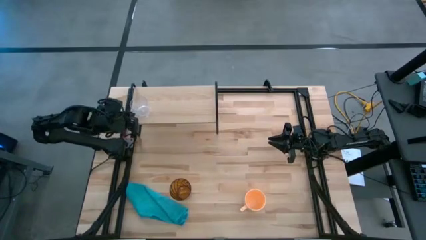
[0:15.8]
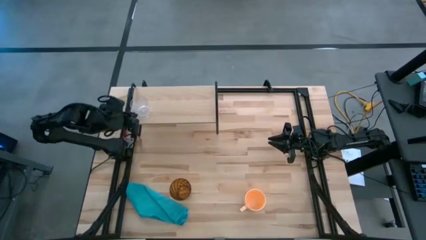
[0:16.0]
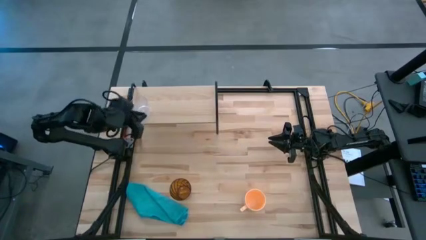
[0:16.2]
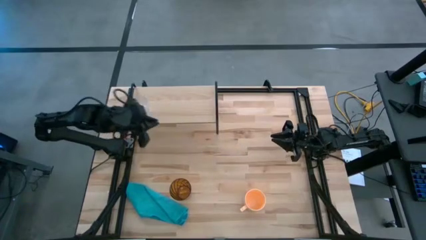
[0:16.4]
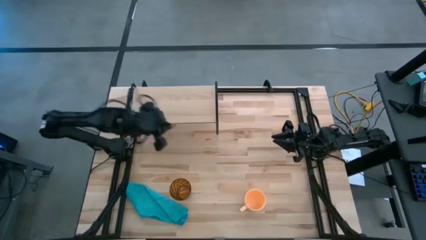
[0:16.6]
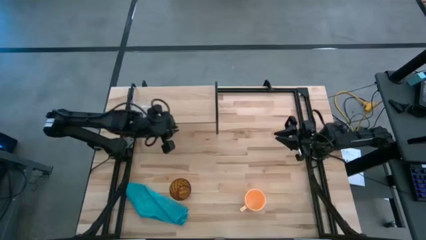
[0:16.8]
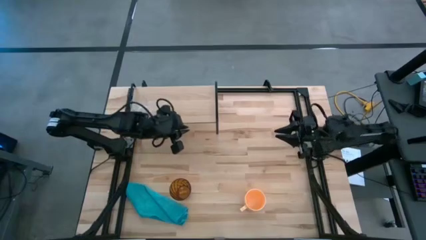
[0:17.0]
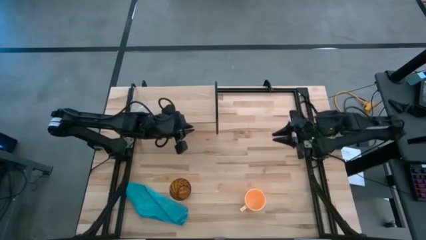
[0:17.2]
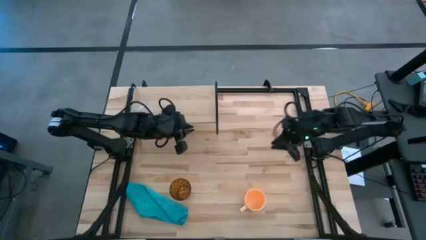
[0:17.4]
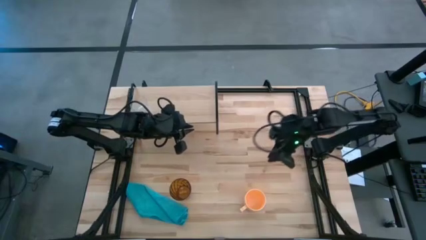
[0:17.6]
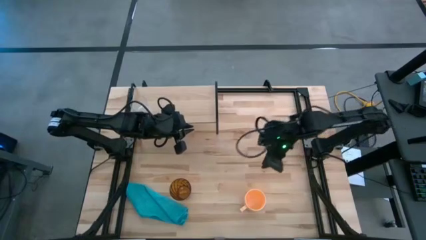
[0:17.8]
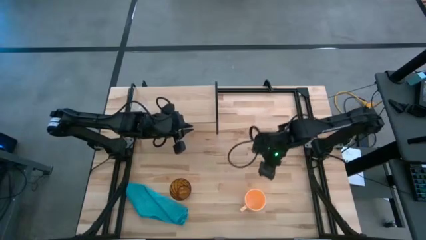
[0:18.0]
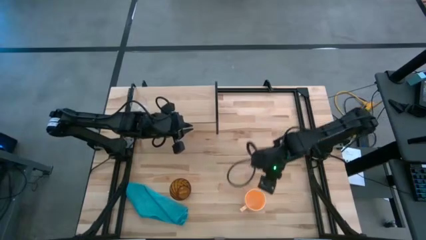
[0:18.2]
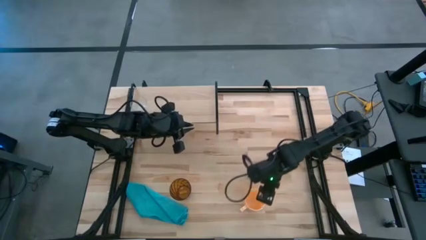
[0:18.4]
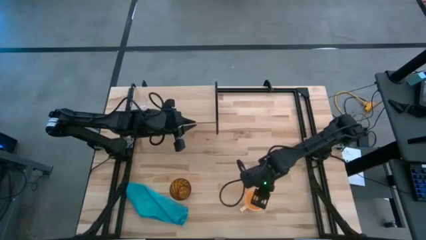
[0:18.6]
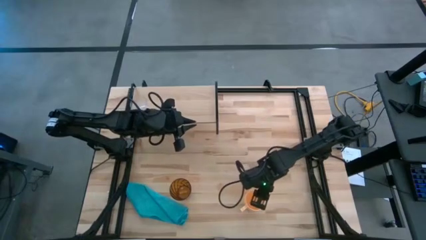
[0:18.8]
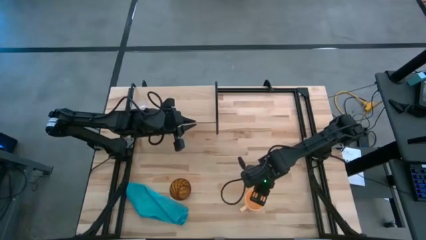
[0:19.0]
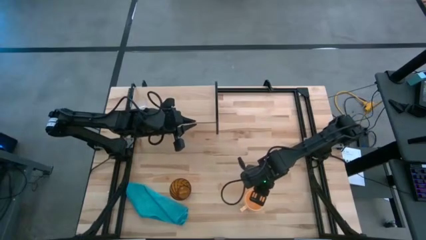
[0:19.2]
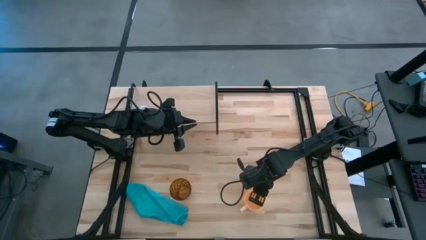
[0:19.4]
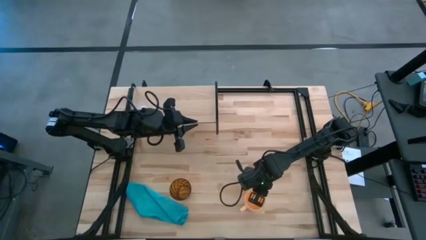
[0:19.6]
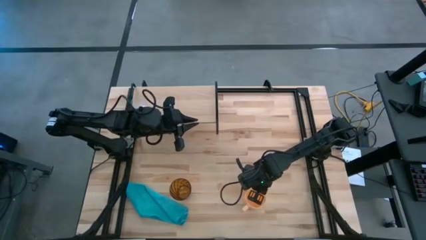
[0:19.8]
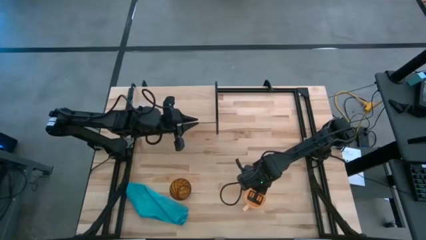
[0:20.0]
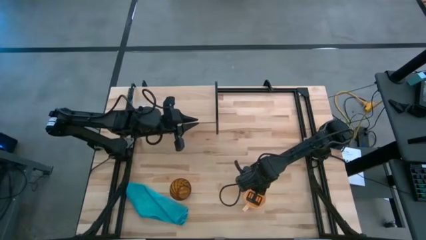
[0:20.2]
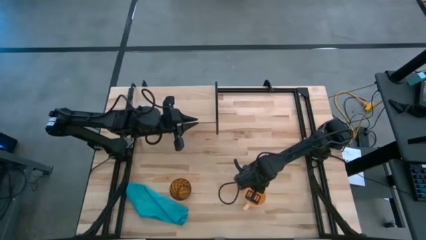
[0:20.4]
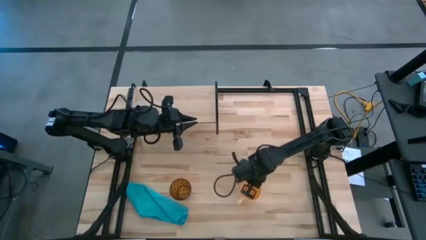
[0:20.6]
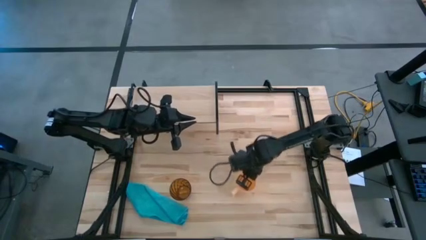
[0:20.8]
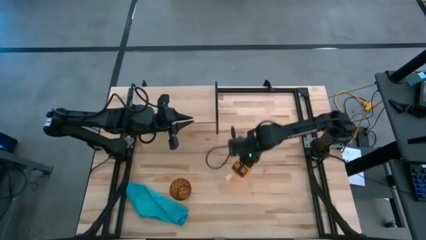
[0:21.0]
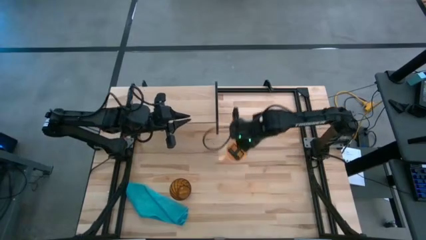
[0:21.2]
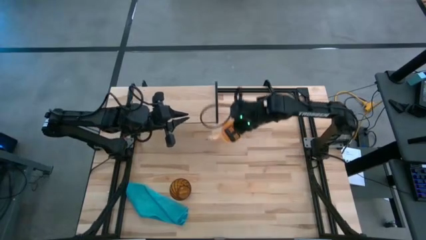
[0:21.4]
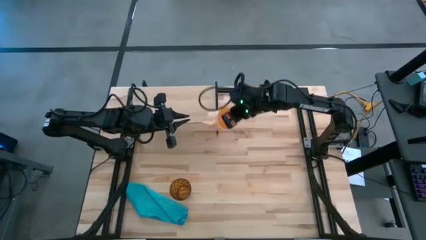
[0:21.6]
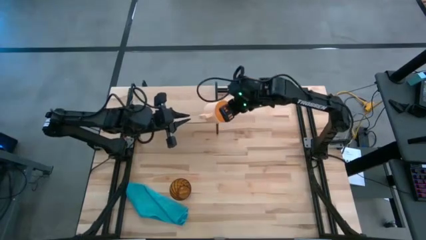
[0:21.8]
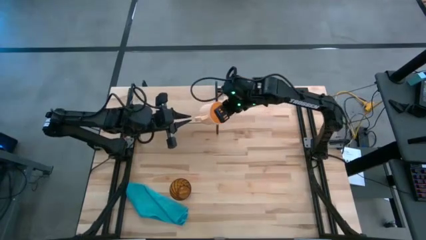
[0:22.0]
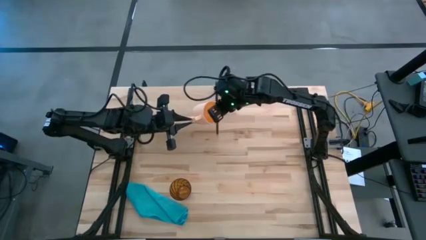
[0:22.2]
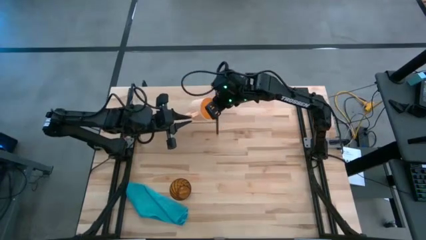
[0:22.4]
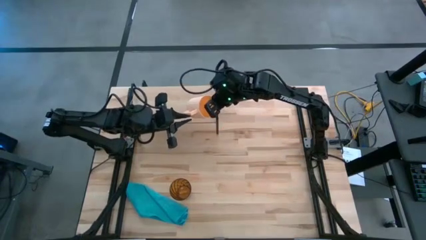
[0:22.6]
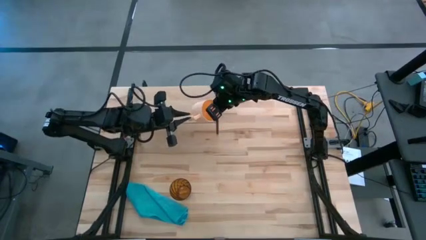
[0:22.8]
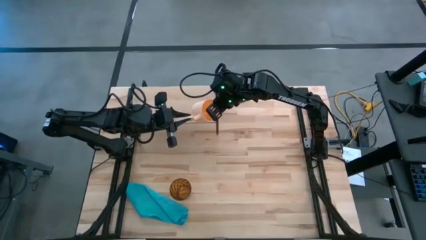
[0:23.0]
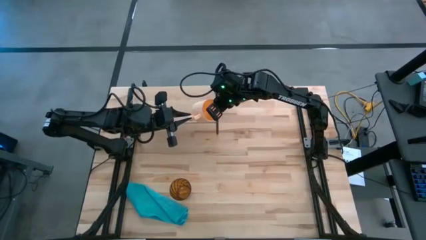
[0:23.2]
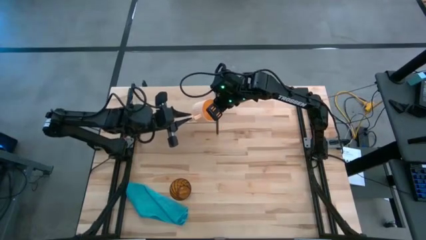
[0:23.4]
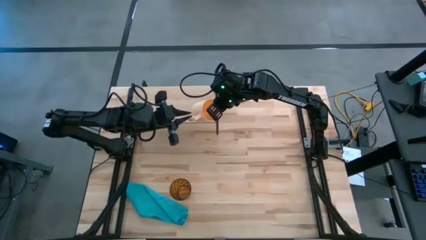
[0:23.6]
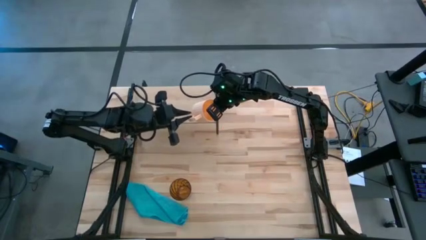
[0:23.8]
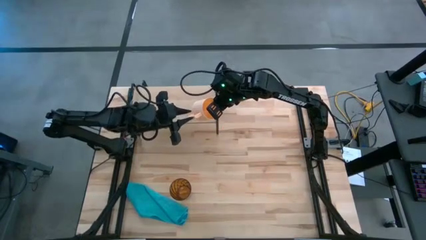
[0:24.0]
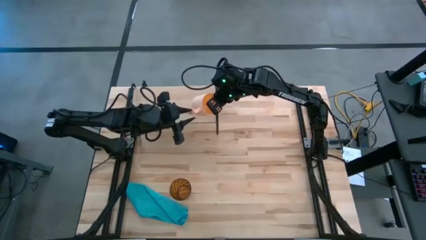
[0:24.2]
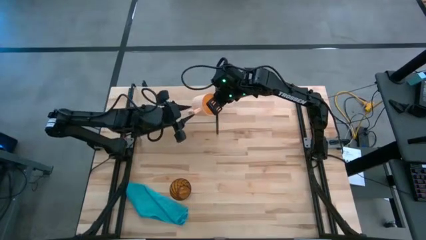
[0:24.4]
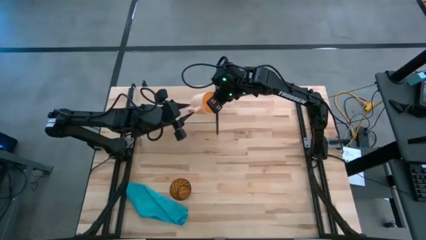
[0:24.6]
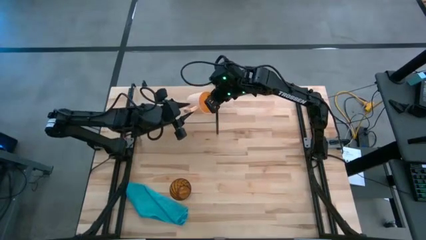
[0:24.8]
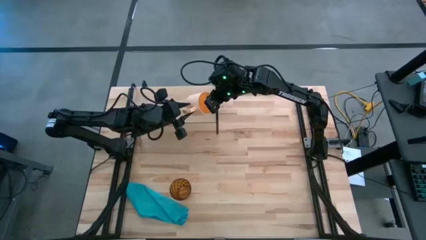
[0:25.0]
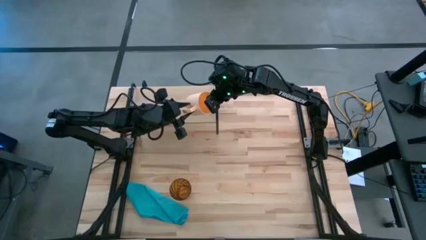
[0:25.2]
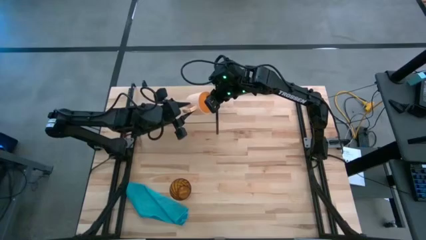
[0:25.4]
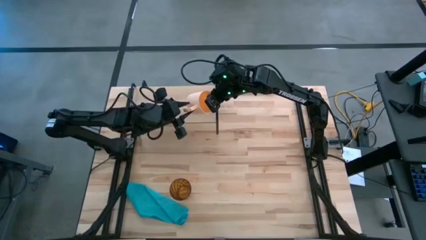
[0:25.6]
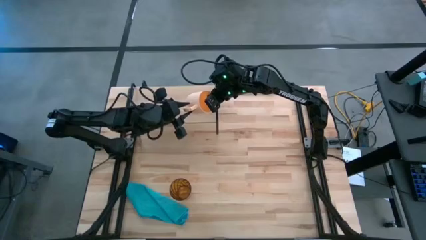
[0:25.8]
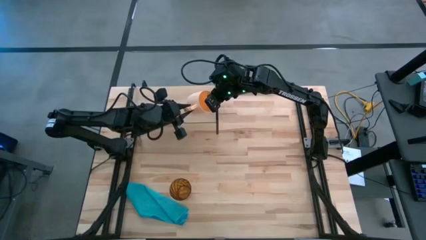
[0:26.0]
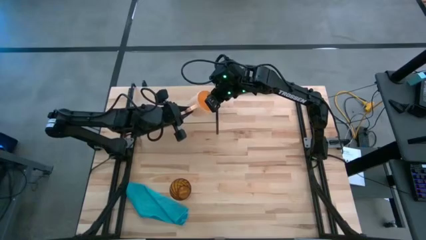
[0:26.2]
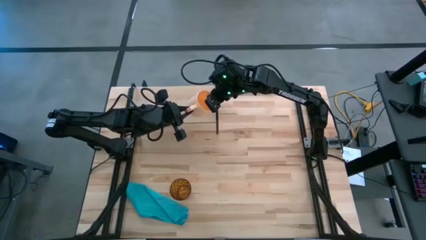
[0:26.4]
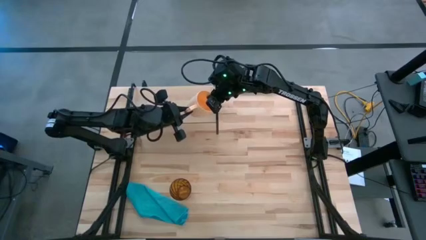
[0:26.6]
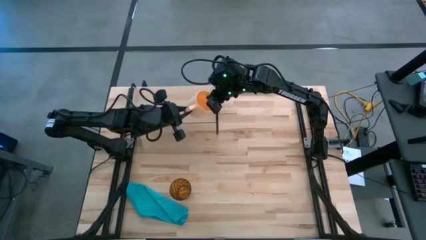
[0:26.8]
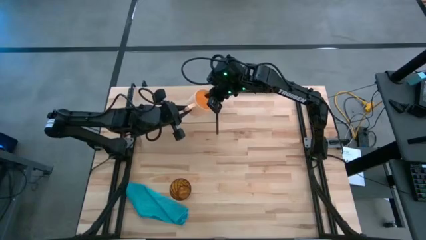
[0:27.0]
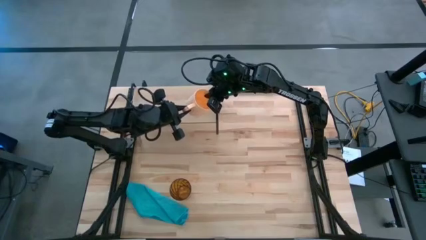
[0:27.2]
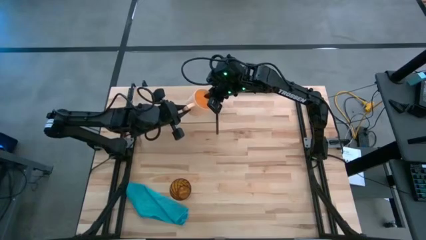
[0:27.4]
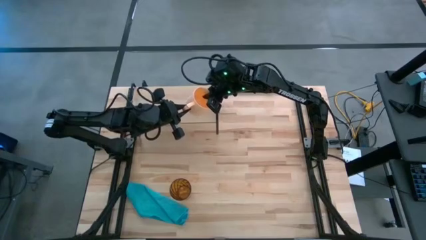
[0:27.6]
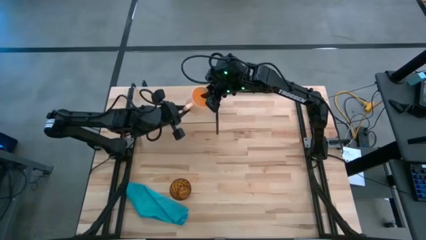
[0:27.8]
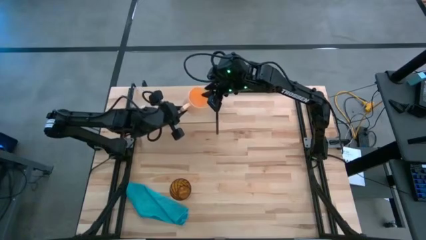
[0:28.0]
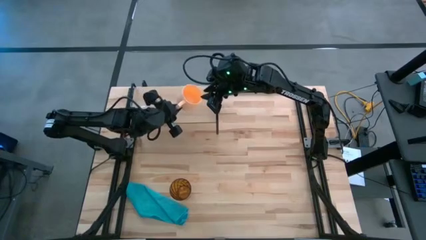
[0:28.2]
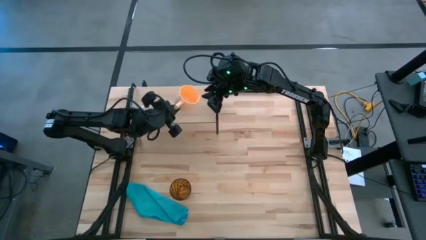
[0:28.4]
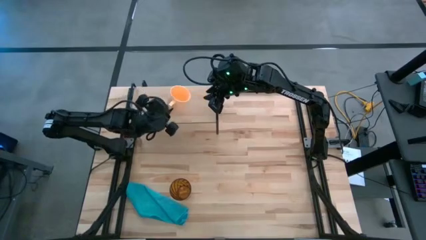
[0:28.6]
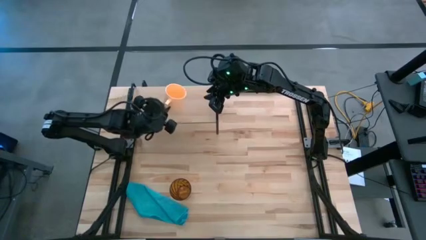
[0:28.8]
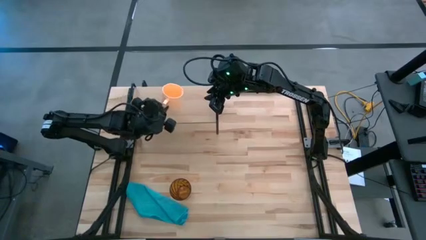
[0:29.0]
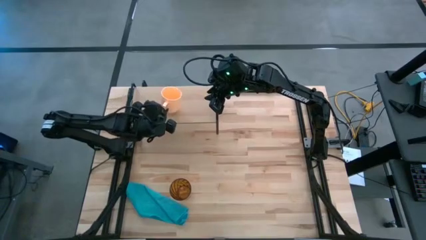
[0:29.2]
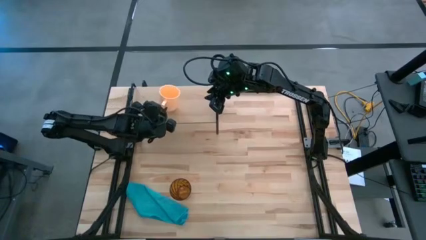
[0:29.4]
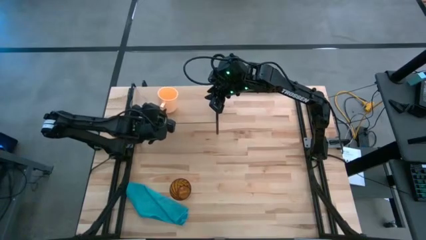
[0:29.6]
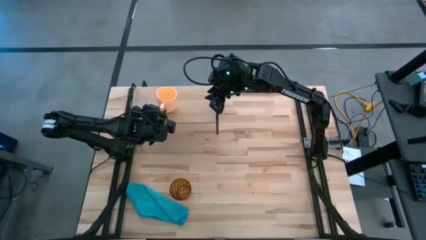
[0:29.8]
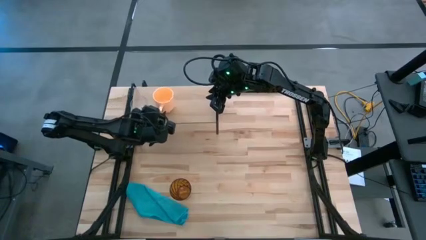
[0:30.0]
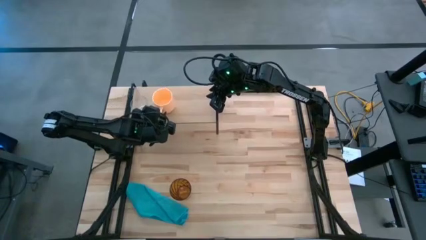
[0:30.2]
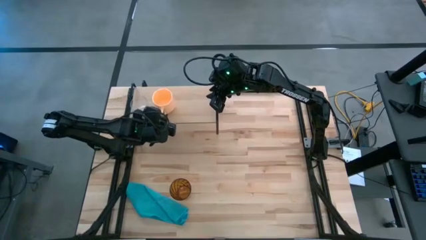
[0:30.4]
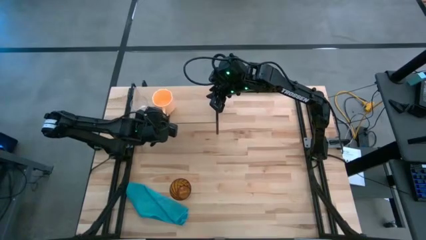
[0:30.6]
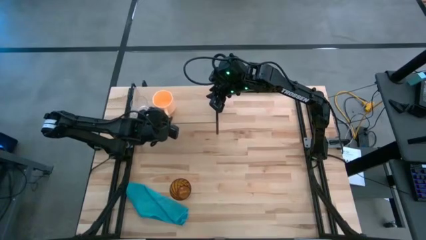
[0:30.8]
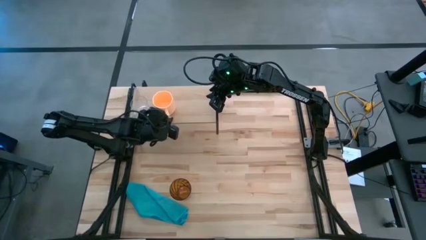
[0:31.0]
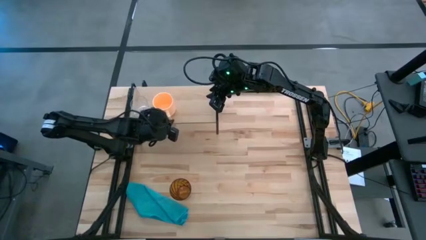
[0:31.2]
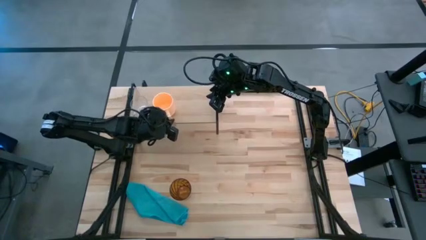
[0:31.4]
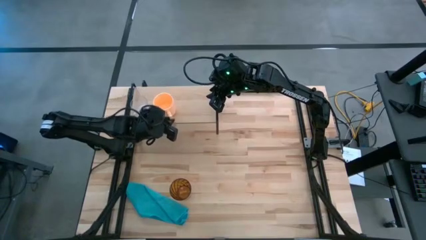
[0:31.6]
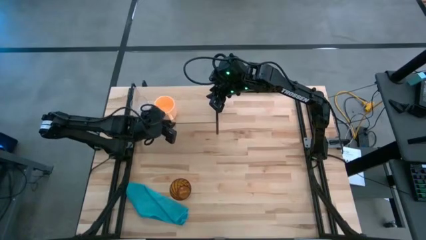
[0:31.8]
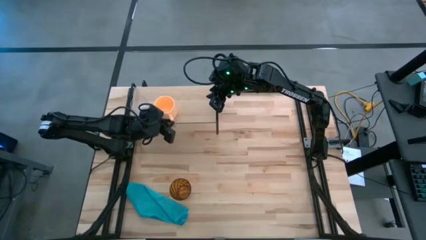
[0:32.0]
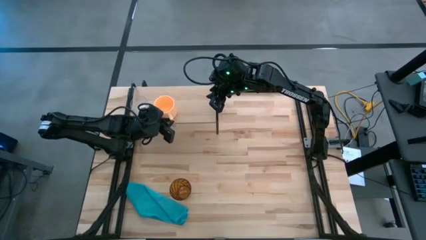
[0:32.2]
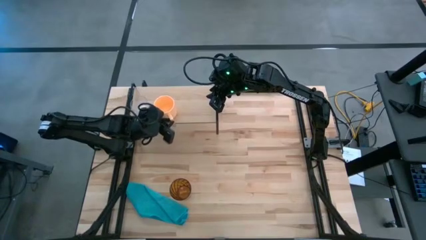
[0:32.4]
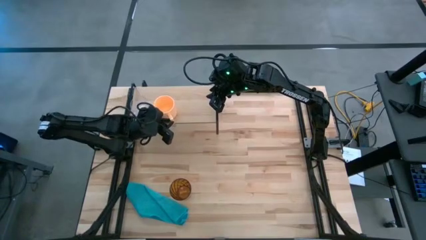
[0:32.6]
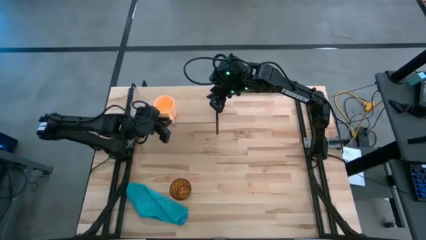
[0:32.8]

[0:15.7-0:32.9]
Task: Stack small to large cups/mugs on shelf
Put the yellow mug on the shelf
